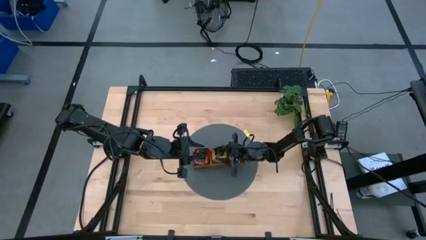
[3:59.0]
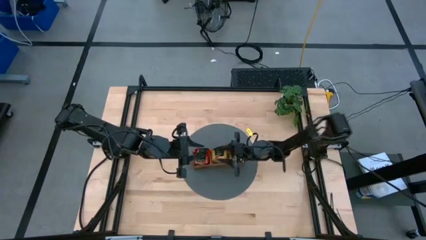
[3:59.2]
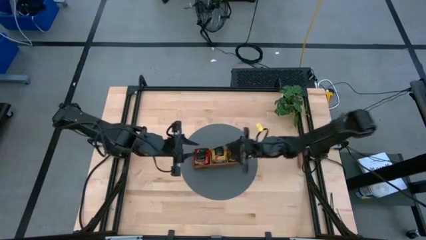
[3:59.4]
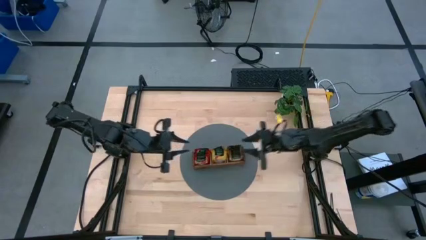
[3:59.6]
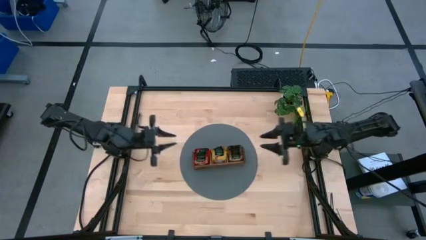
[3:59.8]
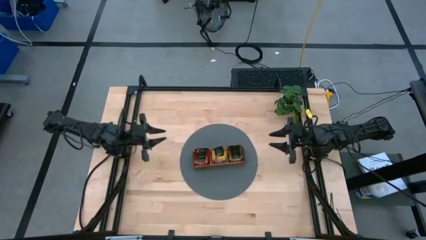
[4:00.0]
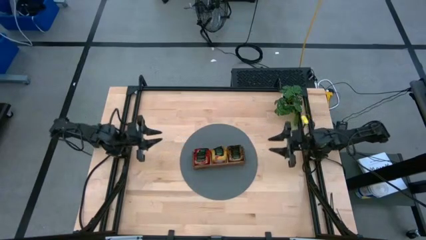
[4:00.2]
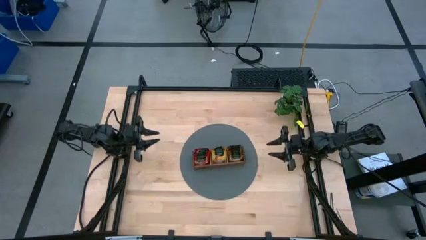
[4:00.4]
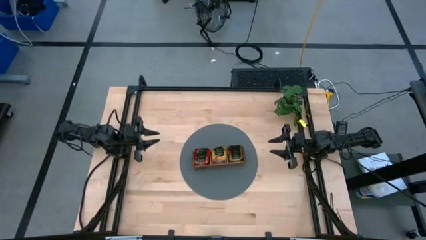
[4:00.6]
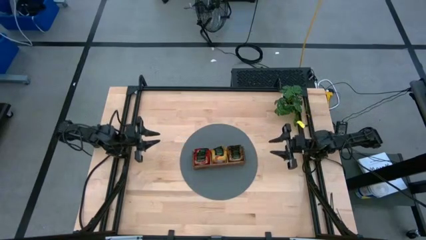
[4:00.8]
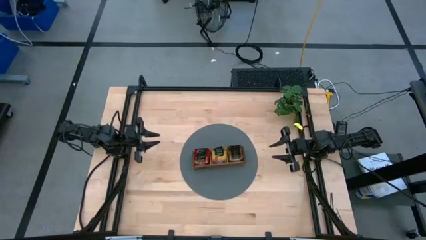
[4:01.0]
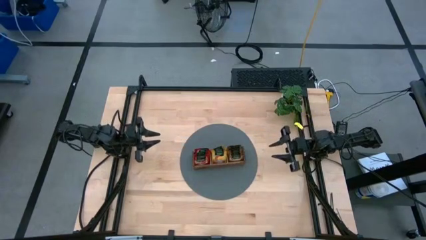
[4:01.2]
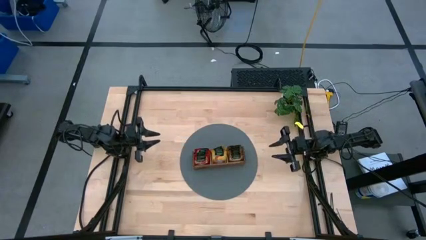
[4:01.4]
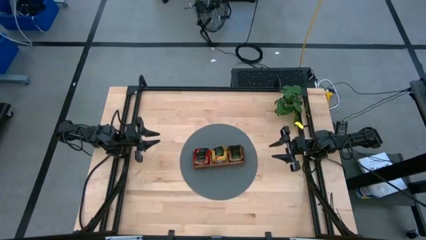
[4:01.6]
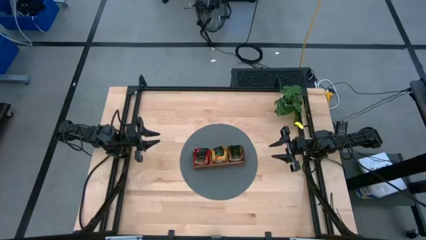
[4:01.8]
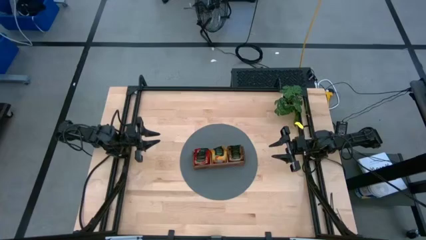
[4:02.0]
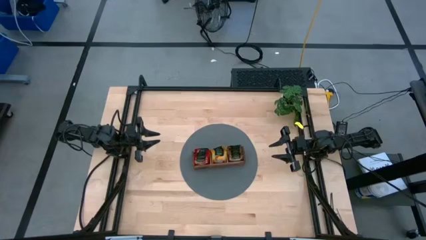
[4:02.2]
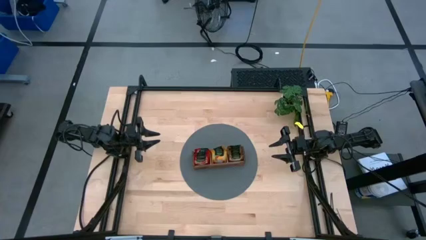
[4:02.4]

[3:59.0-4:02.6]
Task: Pick & Place Tea
Return to home Position

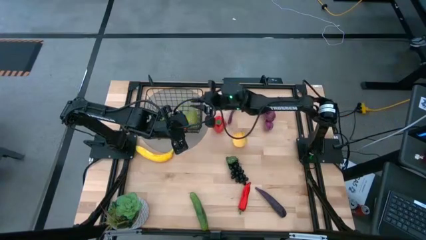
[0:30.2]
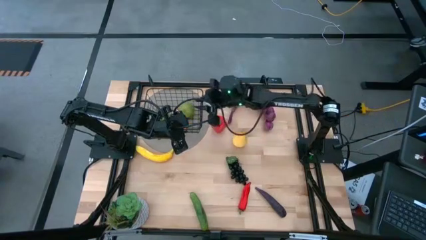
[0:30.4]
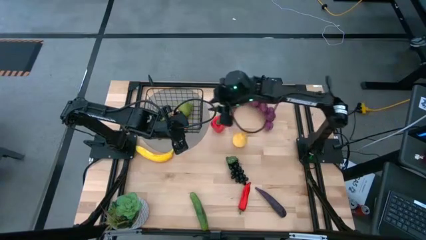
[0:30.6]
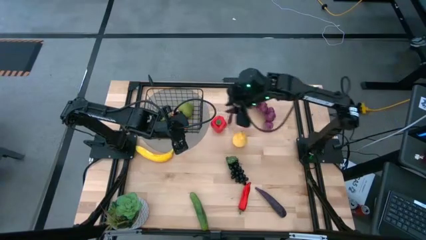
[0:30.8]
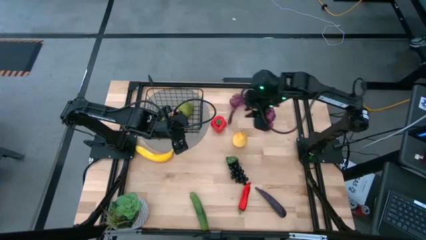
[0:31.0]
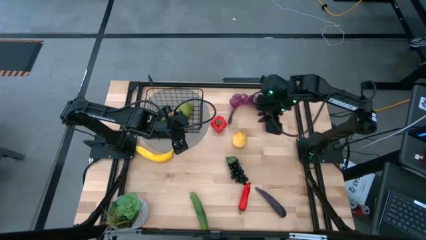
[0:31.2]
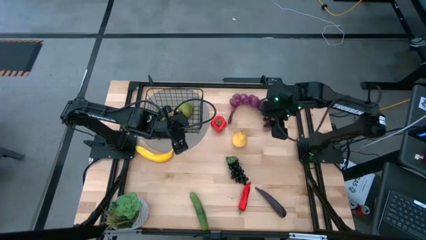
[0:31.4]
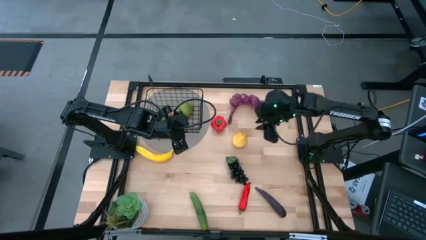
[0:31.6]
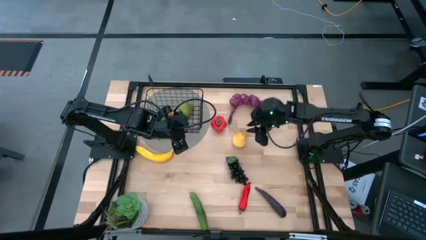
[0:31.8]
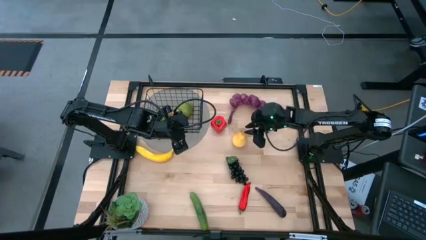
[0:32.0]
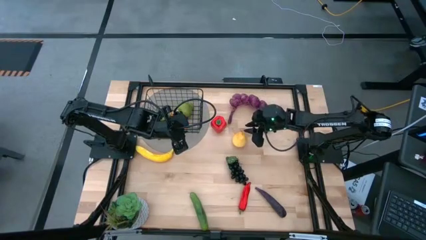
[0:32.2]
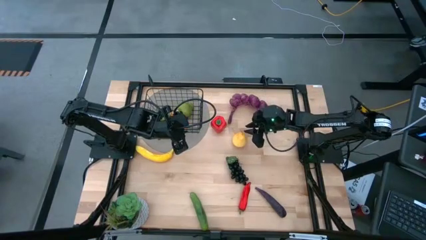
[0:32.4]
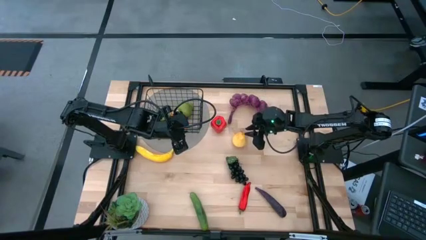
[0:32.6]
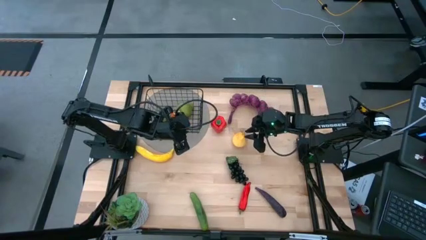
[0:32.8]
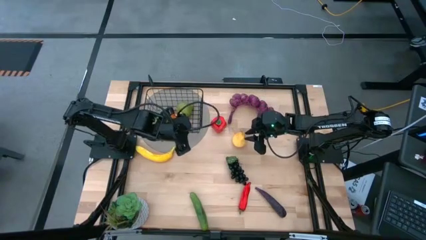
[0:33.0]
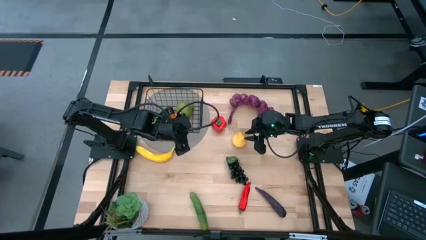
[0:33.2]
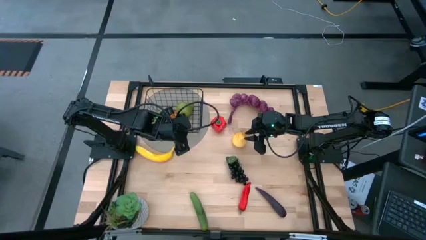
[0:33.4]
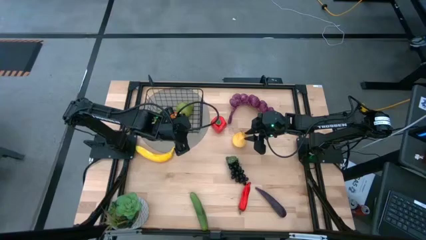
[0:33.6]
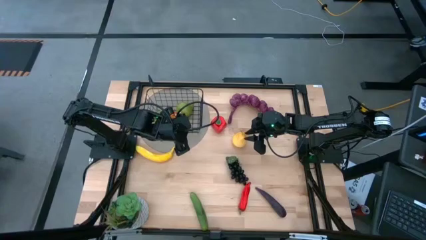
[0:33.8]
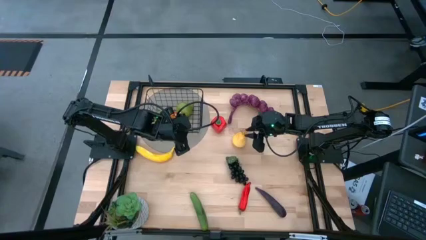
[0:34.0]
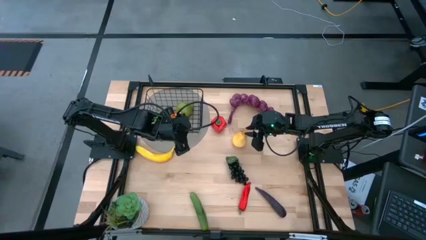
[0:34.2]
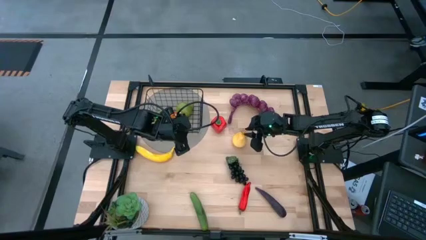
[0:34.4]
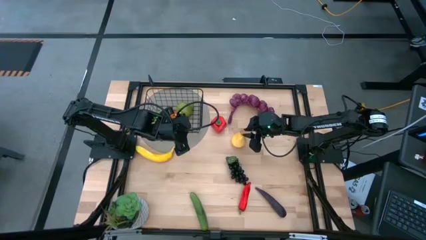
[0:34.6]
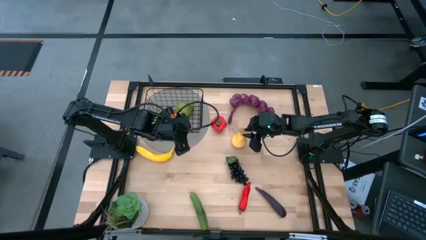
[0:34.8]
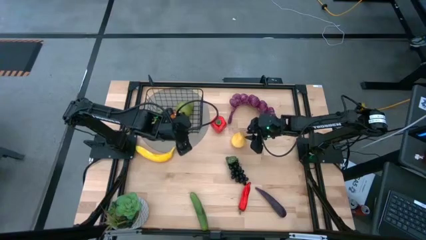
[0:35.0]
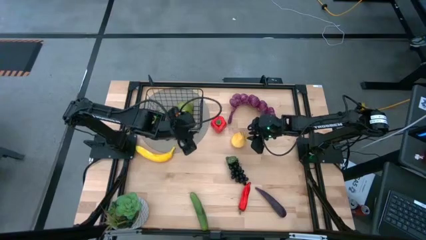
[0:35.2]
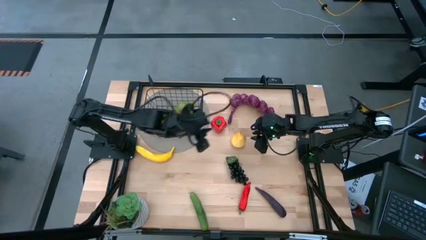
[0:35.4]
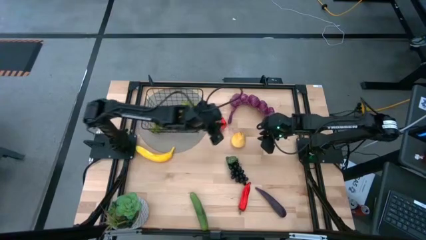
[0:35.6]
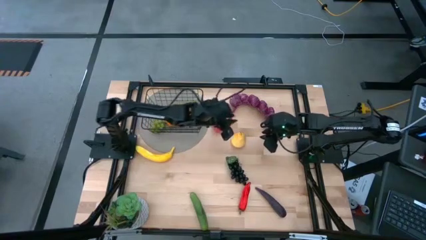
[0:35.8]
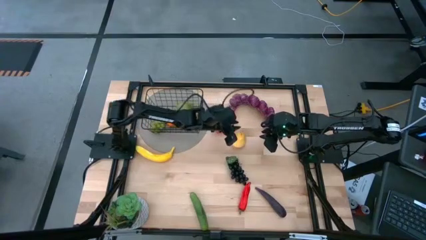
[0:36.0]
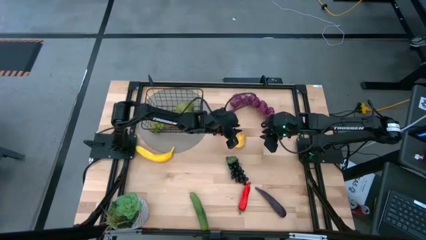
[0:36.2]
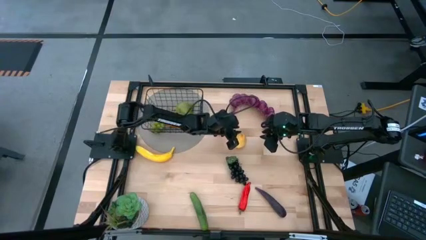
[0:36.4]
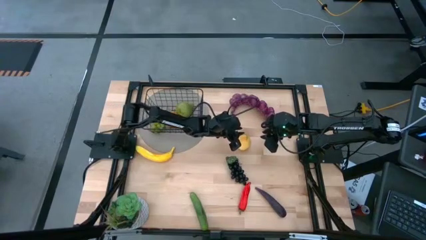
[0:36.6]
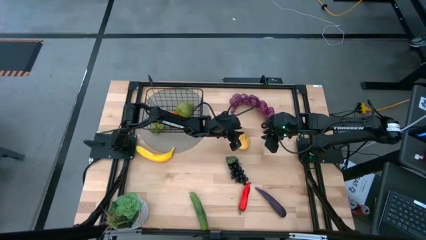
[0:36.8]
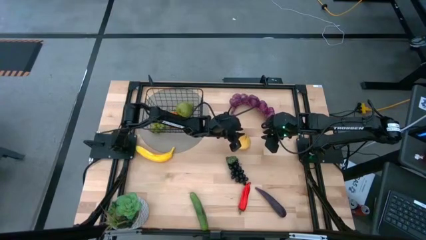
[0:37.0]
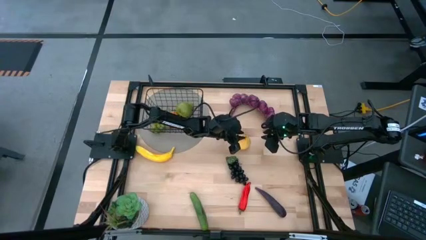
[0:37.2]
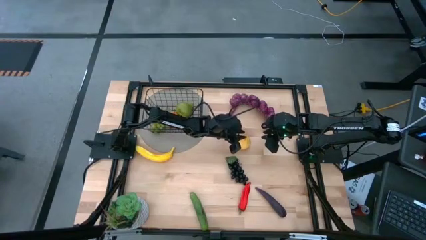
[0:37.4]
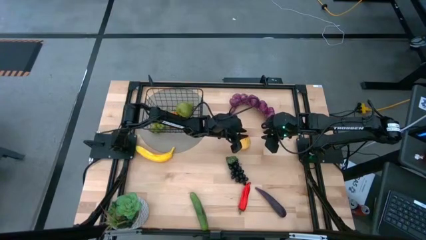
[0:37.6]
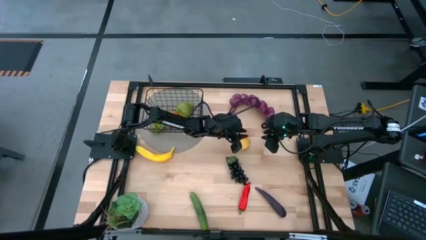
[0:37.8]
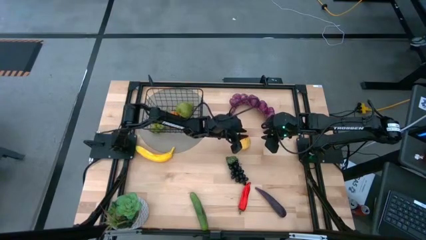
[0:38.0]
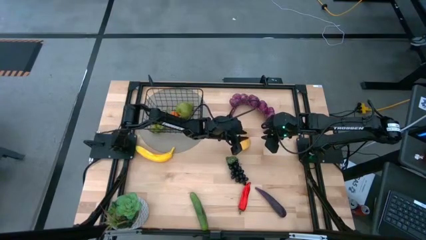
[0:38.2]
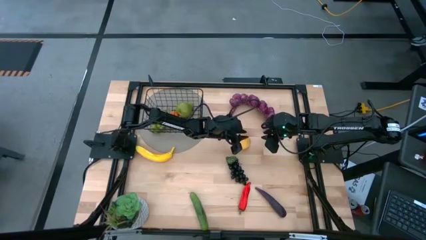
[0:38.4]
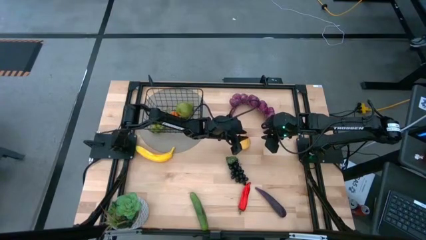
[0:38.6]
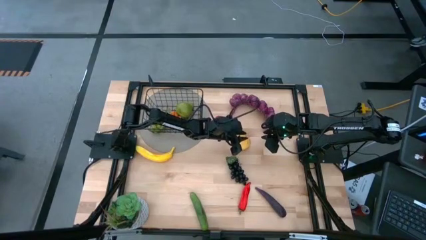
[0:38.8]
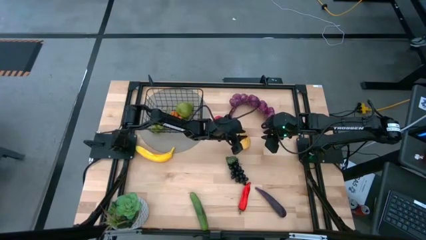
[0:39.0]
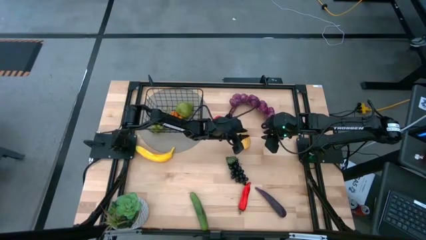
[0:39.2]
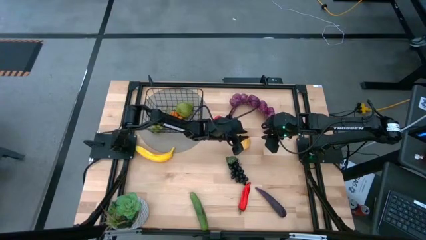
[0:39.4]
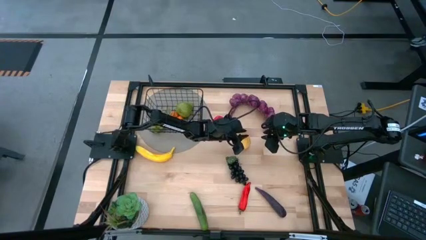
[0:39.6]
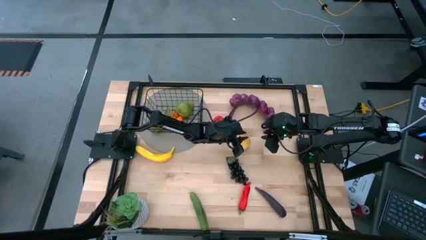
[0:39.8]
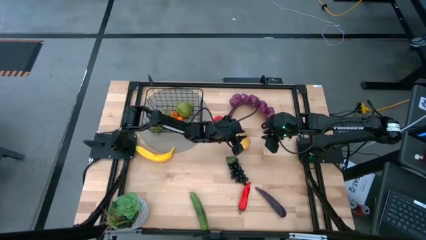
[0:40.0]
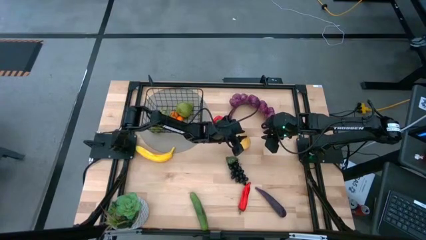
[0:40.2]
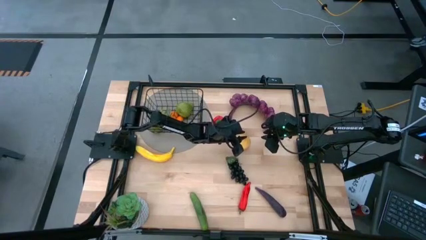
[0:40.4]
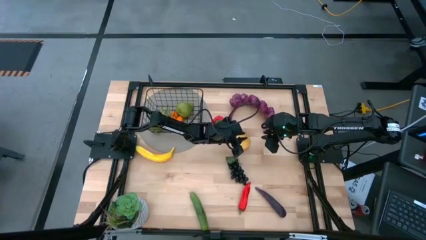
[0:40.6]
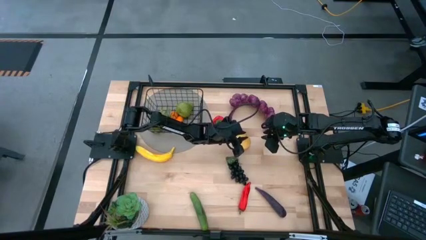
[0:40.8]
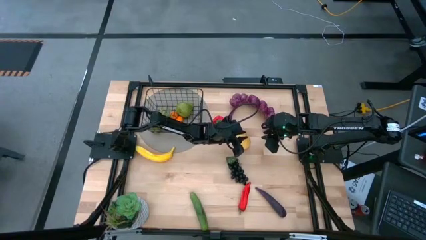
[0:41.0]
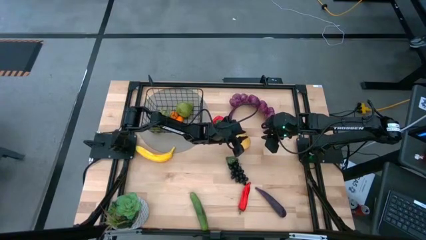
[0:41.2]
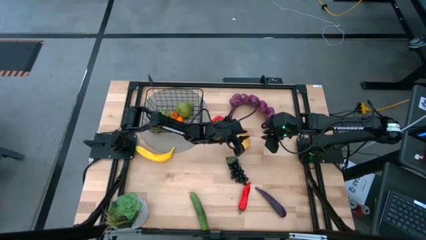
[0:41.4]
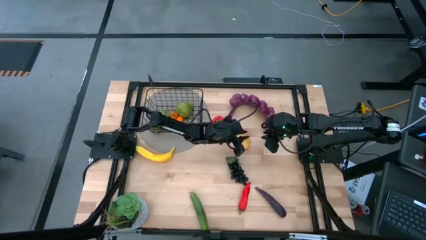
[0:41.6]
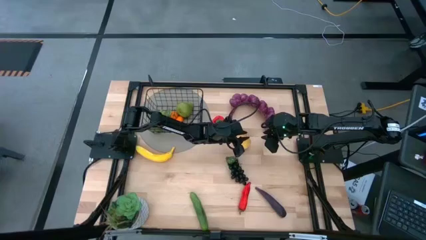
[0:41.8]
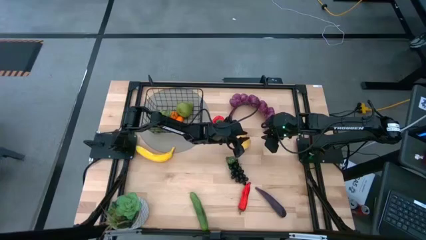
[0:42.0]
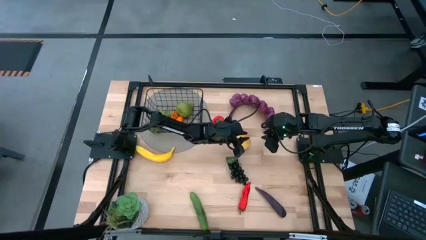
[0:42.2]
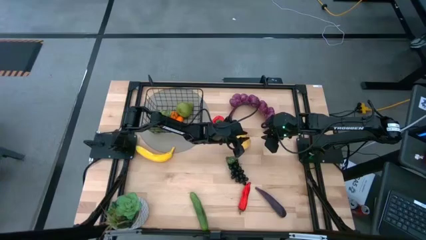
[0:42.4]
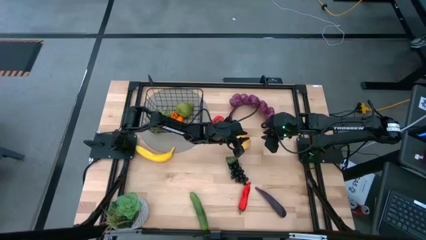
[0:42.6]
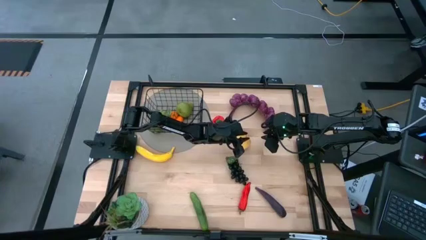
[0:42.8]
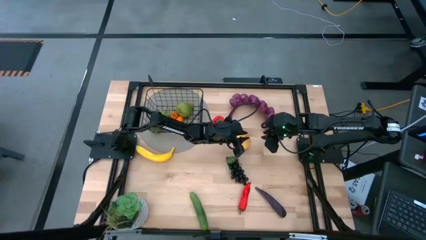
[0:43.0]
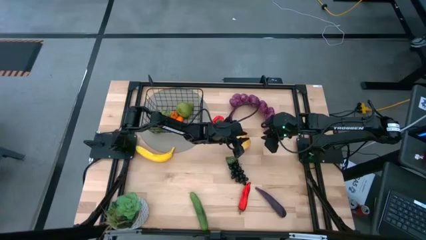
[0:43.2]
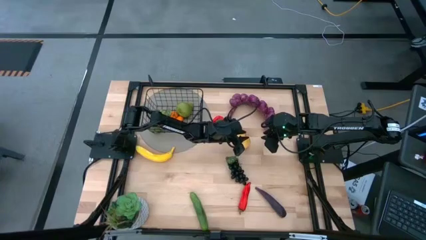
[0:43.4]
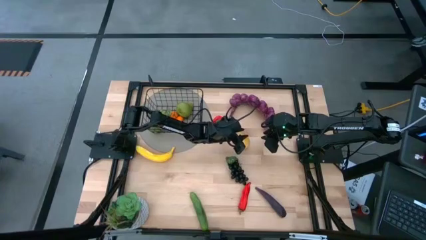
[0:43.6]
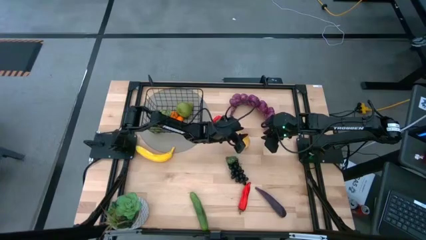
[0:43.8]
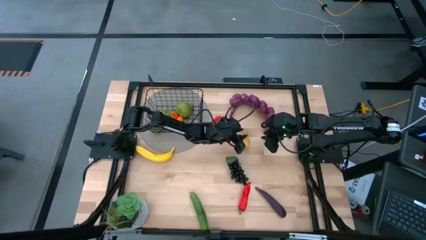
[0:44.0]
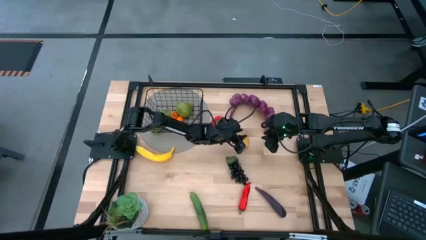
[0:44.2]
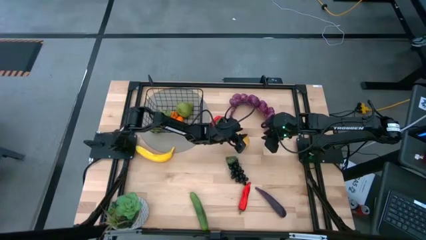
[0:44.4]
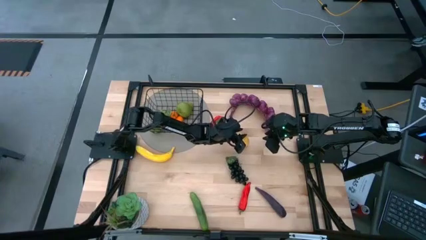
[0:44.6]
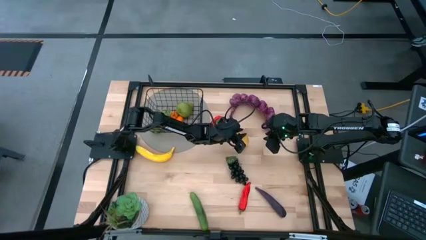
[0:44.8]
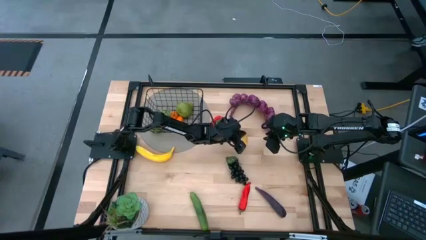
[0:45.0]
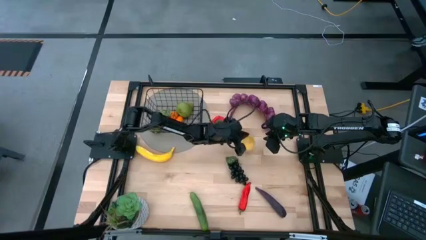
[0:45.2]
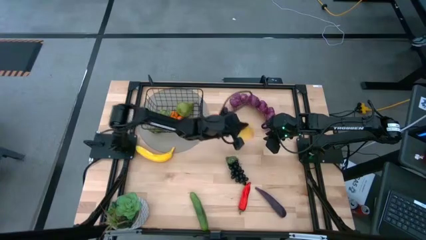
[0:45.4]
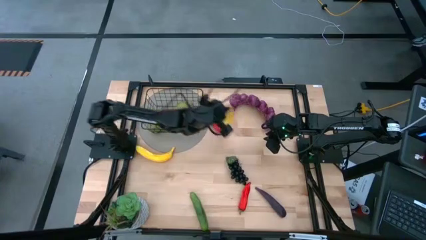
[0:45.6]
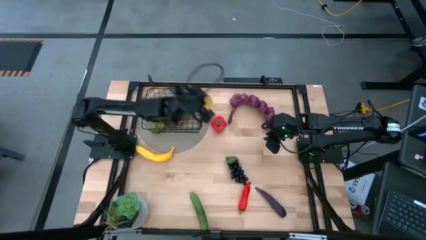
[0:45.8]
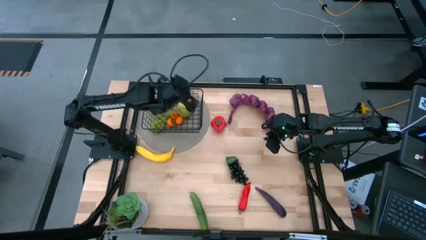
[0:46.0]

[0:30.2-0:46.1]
Task: Build produce basket
Put the yellow pear into the wire basket
